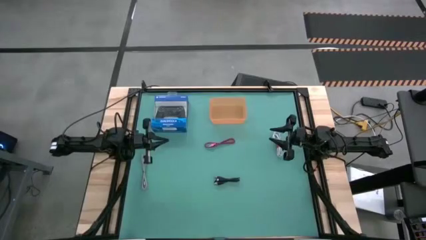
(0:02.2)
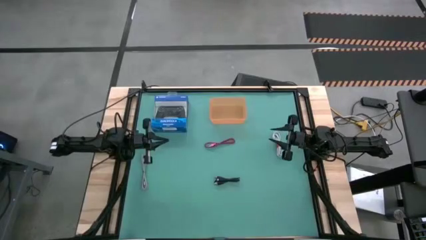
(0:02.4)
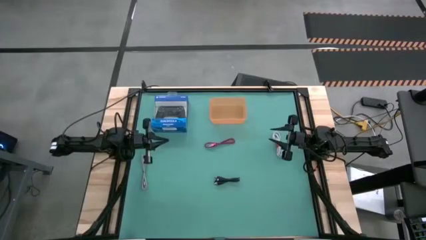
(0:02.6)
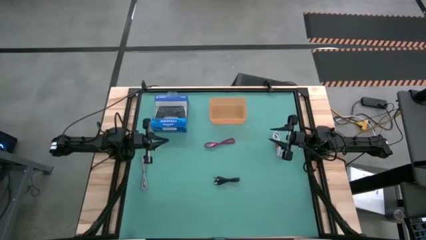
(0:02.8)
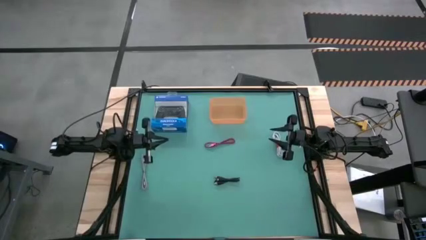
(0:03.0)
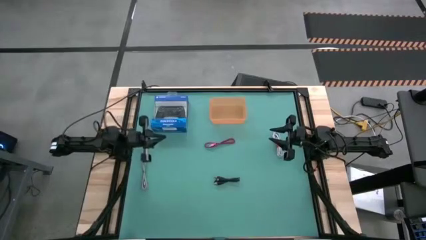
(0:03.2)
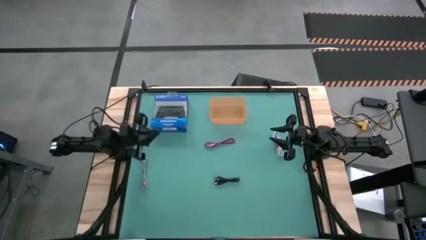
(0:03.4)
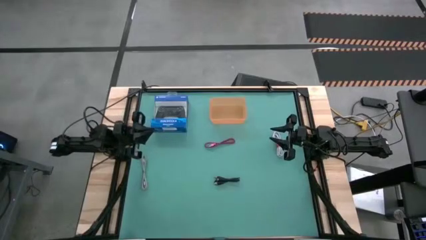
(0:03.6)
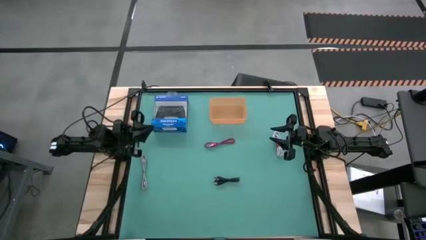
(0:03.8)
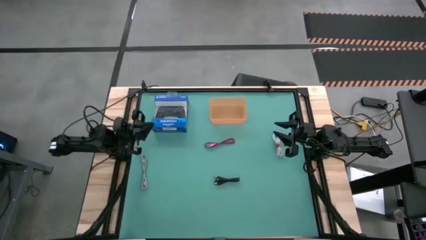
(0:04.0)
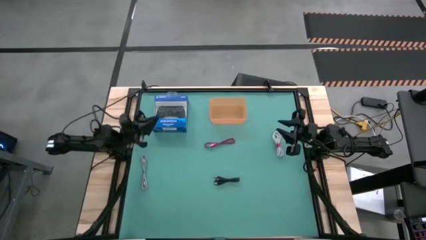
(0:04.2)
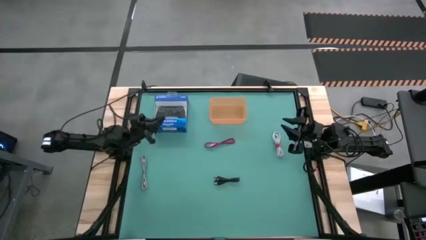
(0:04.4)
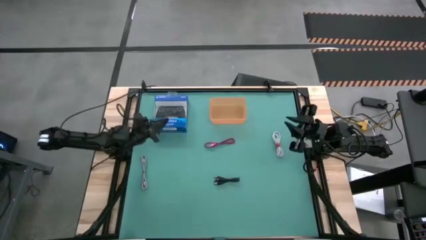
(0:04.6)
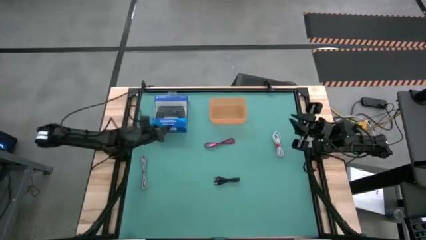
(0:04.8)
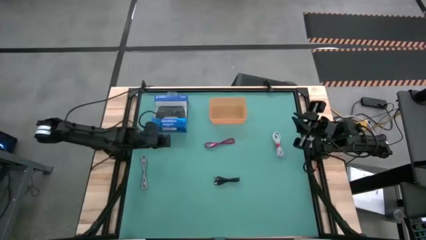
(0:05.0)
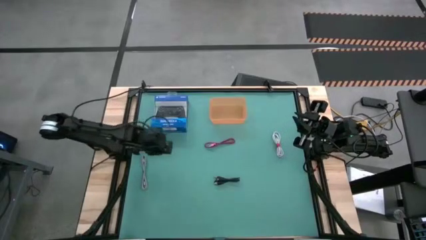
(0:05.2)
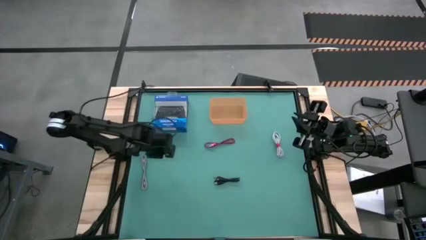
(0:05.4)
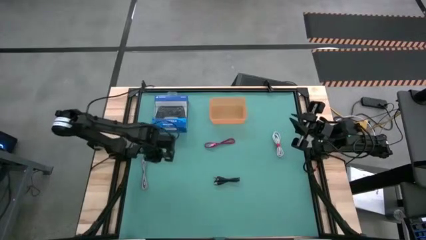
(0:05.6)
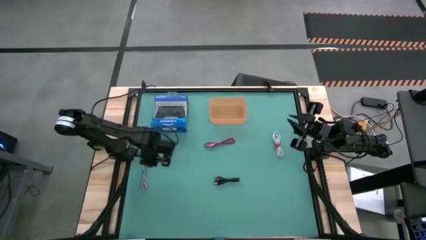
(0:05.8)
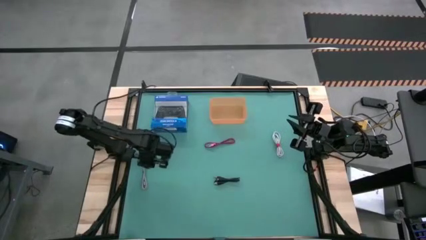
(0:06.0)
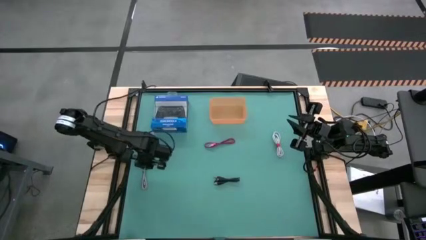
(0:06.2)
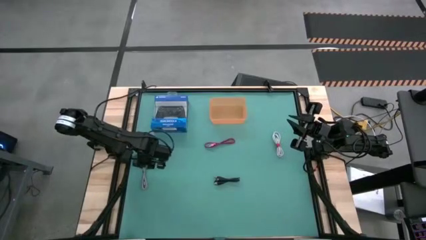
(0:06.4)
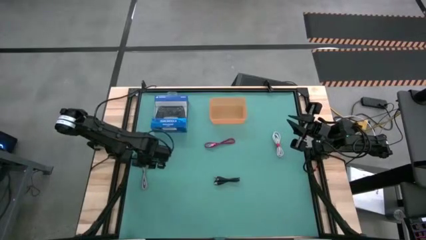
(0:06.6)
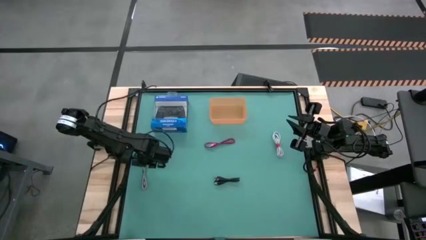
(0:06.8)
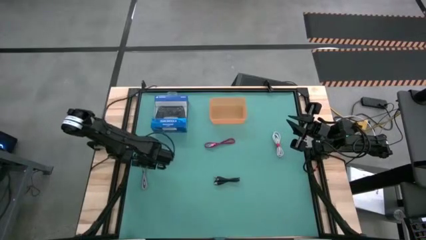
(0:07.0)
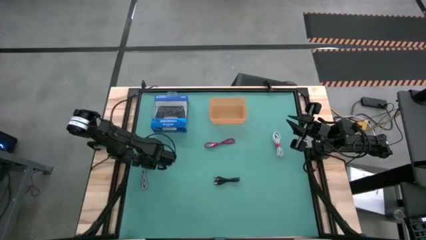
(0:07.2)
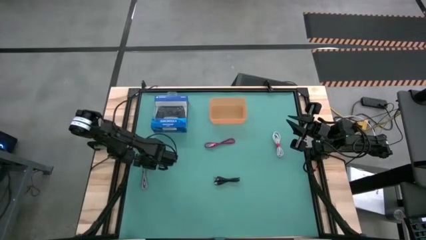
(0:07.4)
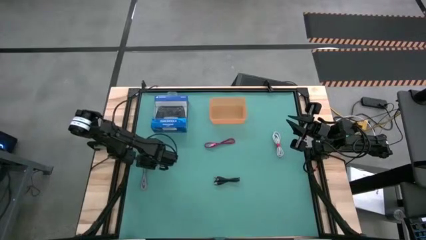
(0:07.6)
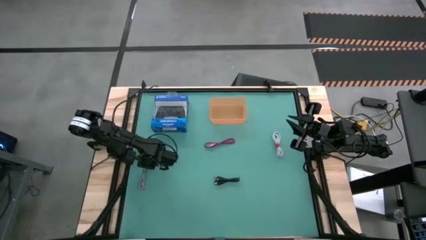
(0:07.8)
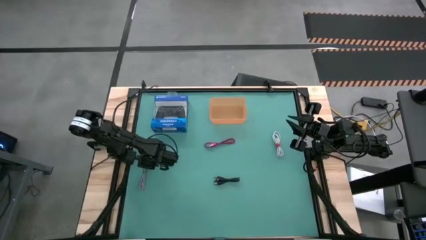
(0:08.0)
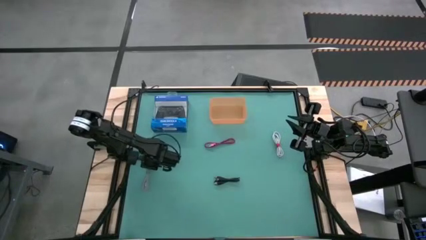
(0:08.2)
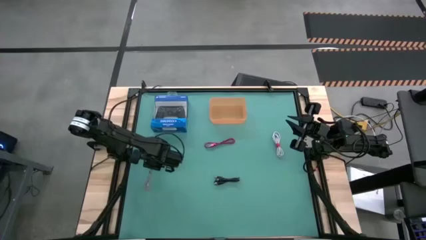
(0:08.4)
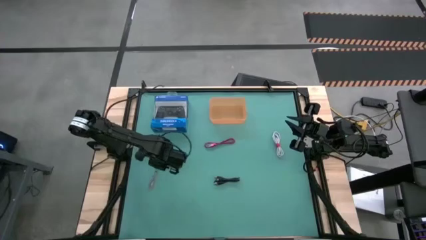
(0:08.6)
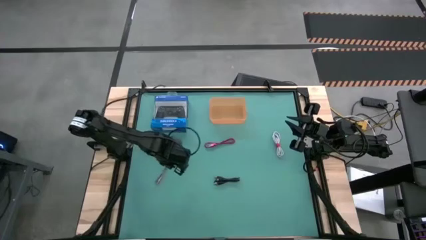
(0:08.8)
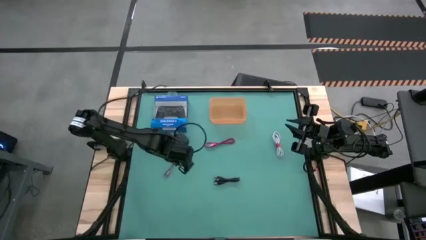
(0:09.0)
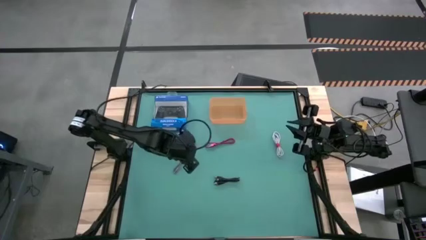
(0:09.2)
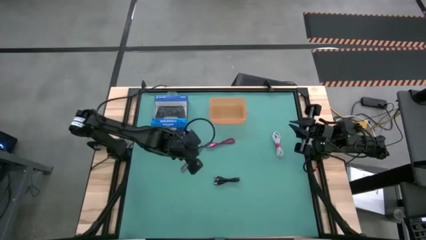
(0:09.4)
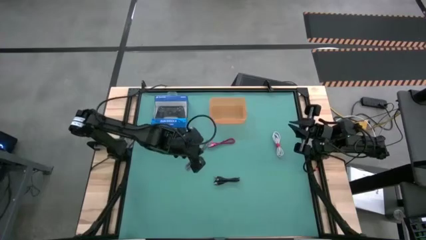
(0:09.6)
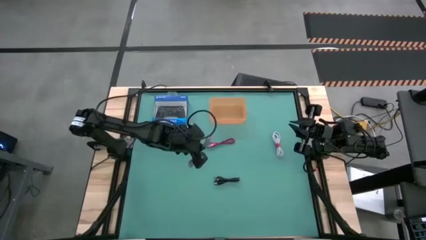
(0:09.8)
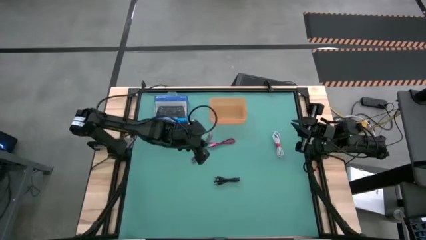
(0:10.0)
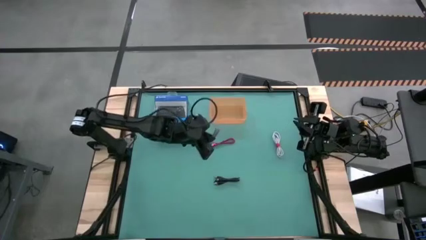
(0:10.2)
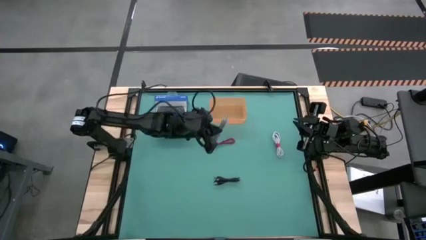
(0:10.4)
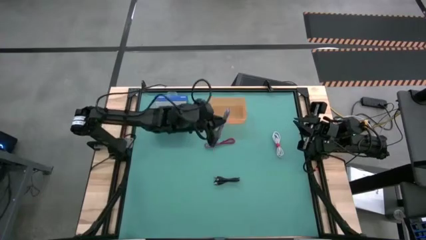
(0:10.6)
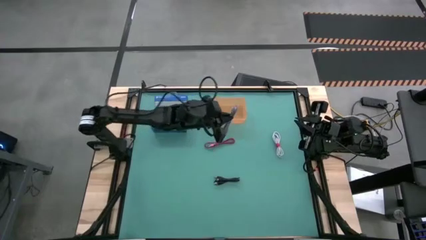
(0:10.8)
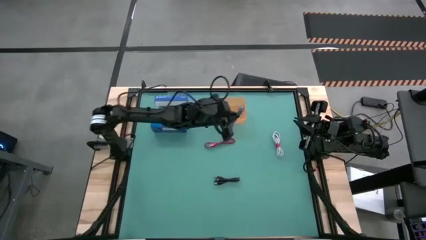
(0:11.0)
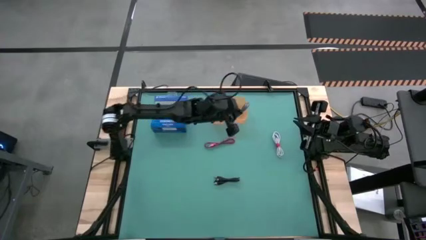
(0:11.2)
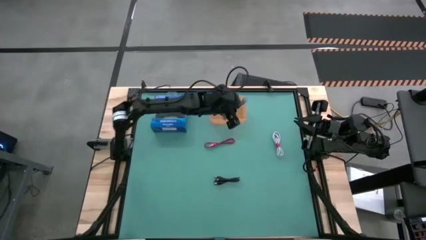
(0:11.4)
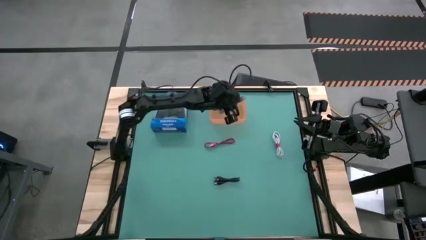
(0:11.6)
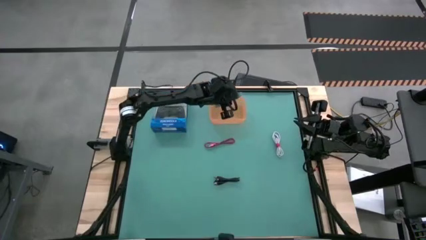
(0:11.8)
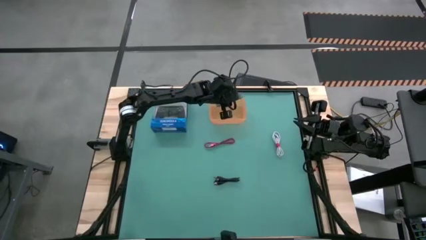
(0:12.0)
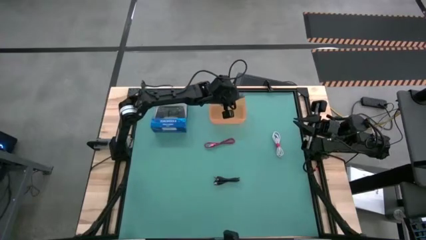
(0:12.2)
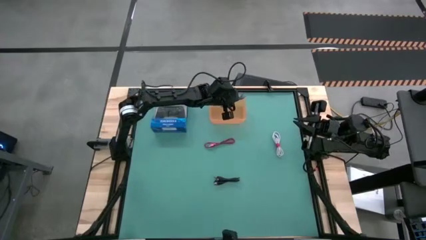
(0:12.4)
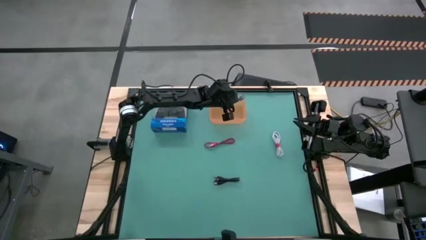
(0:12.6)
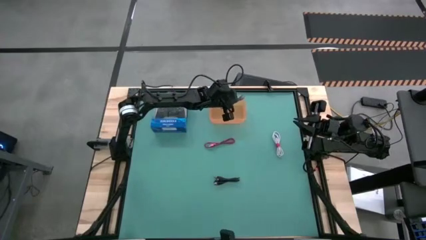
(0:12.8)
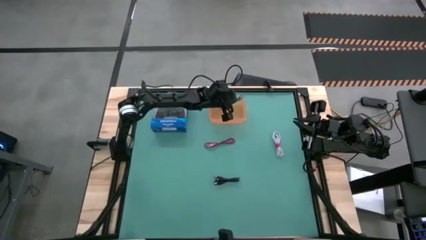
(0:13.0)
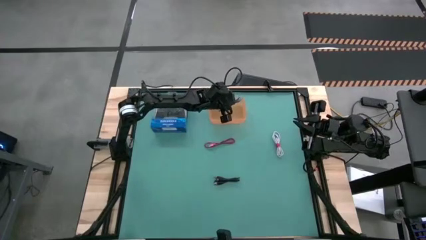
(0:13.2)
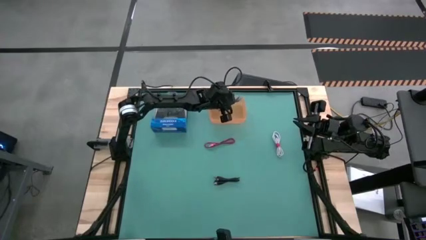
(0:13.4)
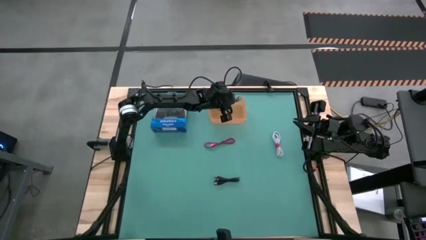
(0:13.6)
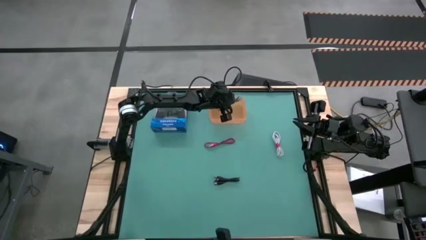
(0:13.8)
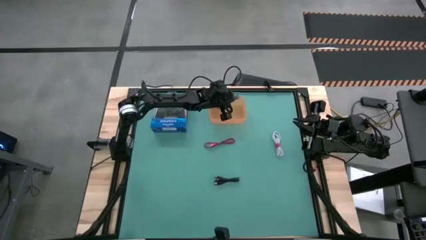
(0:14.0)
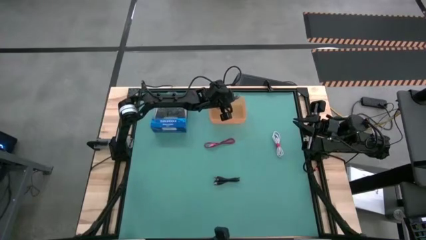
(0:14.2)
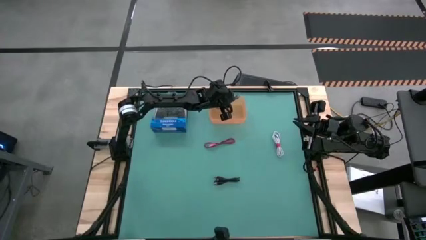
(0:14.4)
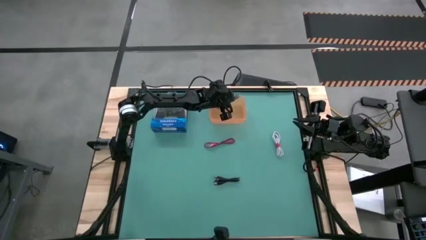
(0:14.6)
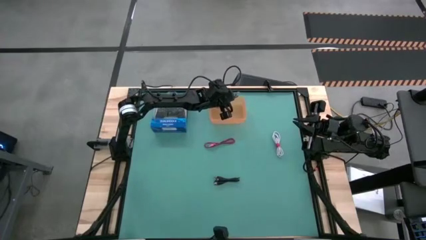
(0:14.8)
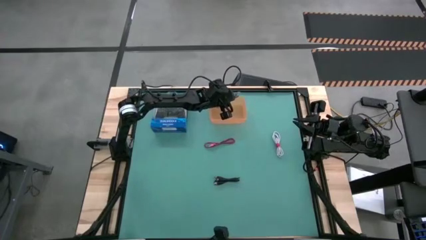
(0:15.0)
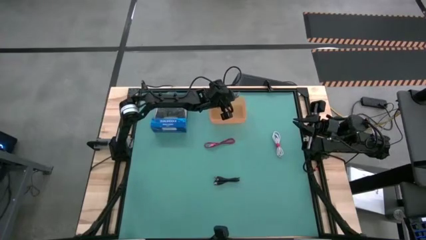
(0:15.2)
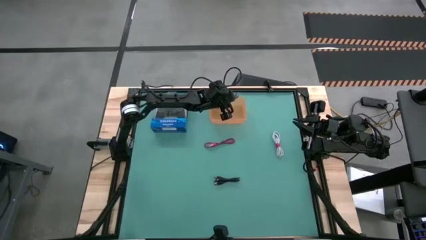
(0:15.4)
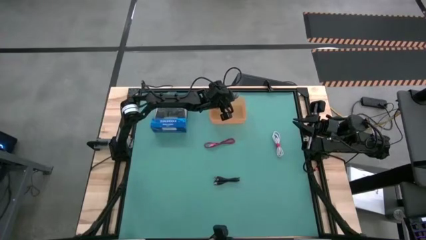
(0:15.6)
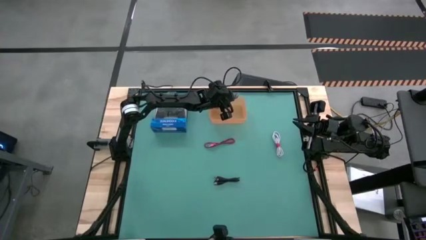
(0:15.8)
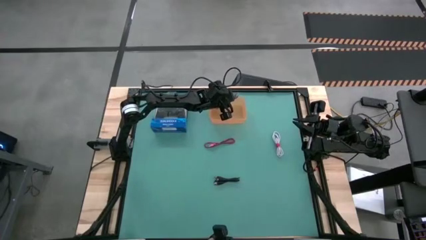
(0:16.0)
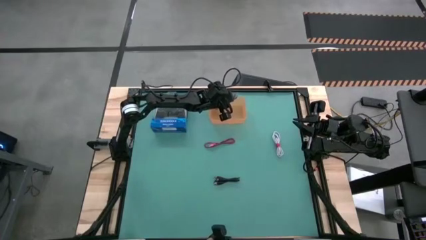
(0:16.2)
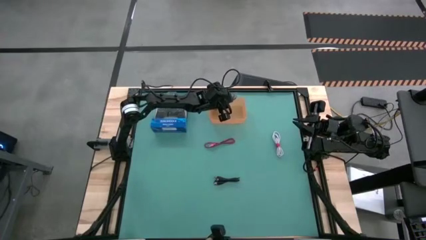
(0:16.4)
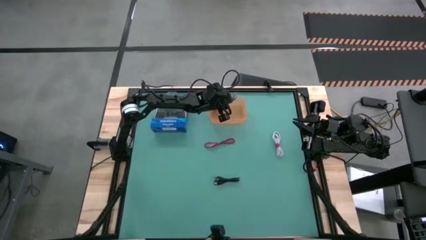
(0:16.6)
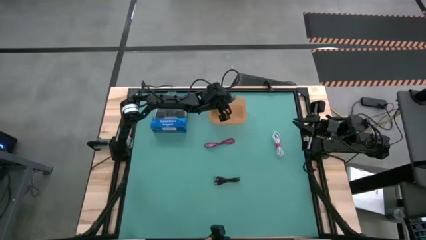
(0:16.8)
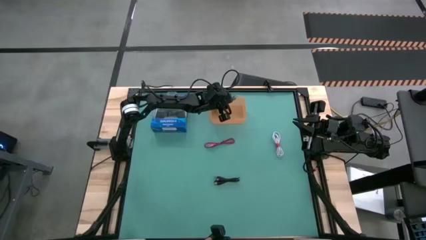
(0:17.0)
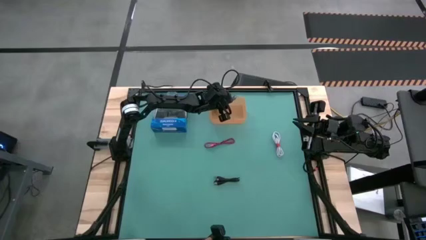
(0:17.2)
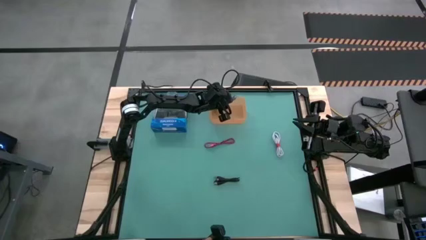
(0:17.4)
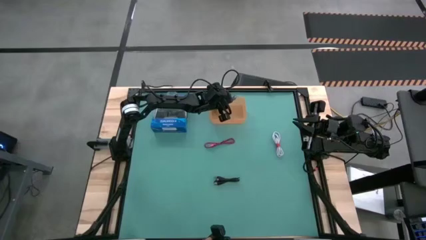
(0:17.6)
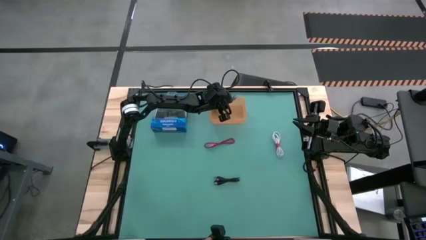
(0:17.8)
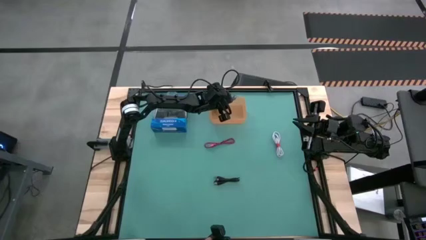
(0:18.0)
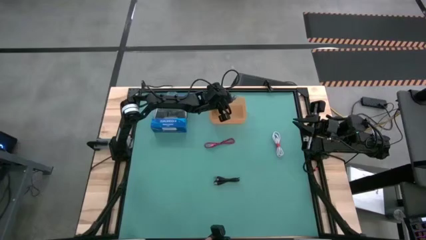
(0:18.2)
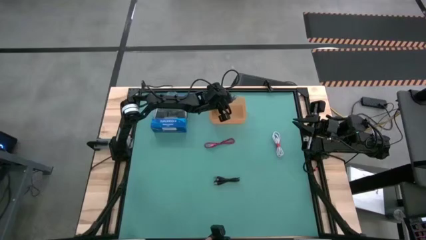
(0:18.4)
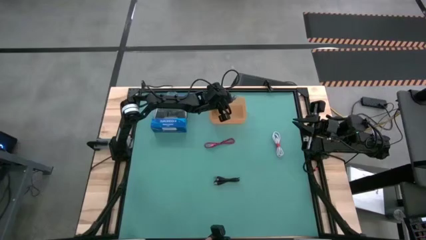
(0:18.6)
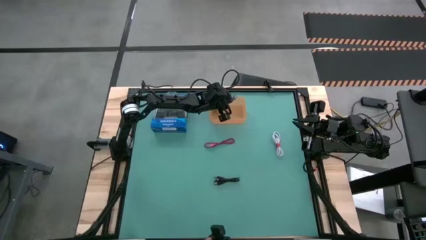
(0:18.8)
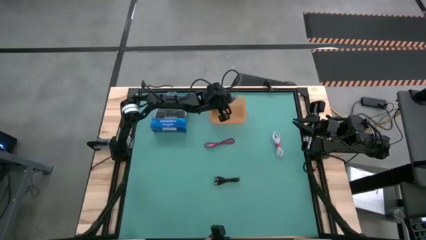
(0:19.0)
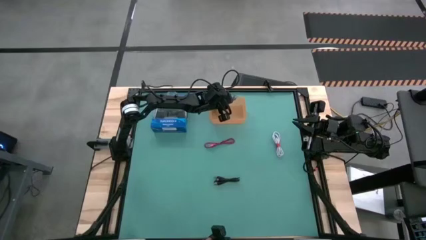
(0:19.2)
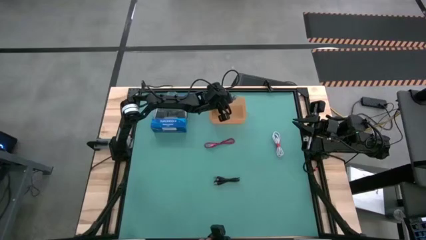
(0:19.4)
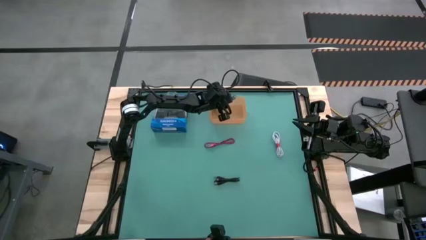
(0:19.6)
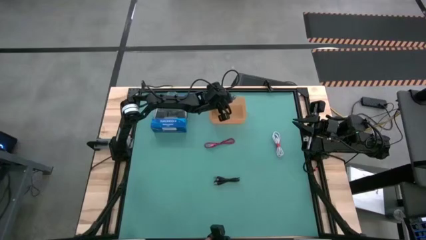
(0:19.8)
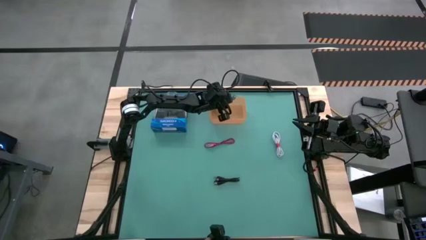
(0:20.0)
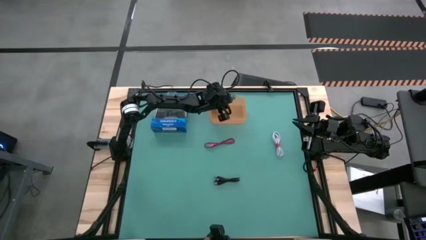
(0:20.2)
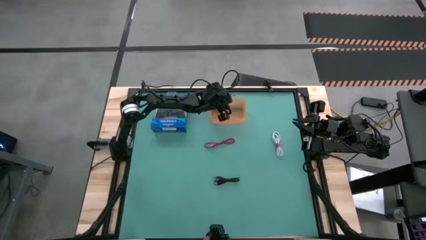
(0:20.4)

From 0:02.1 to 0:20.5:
Task: Pick and place USB-C Cables
Put the white black charger cable into the orange bin
